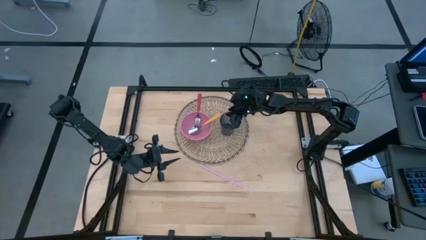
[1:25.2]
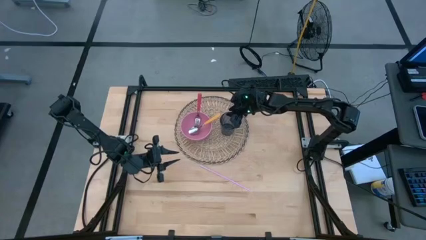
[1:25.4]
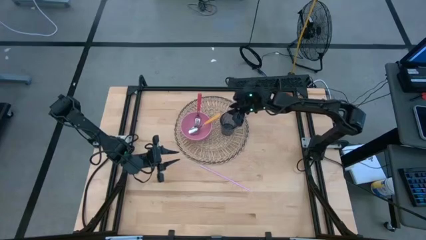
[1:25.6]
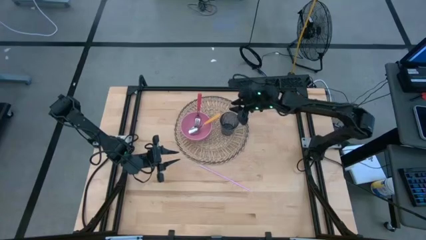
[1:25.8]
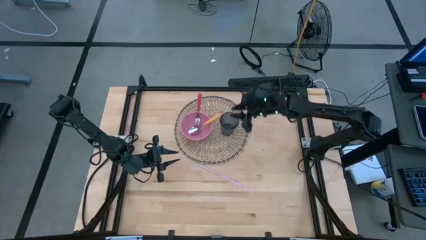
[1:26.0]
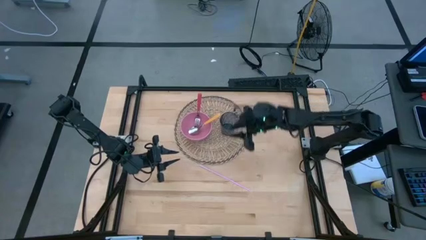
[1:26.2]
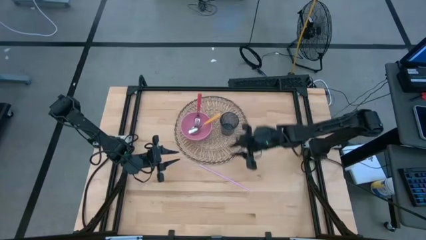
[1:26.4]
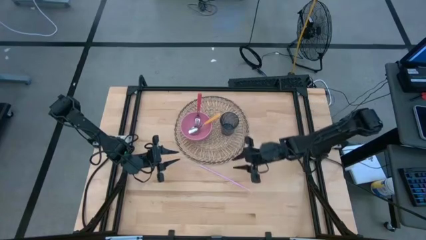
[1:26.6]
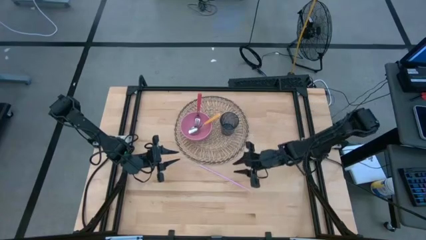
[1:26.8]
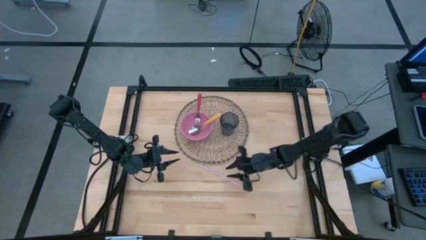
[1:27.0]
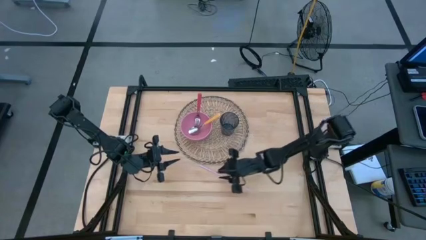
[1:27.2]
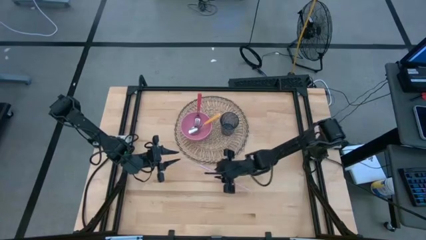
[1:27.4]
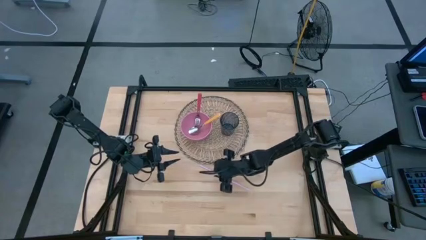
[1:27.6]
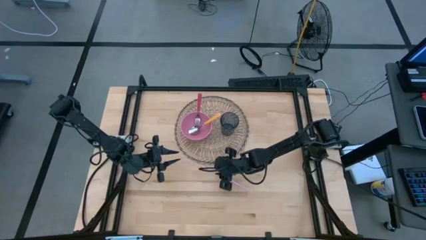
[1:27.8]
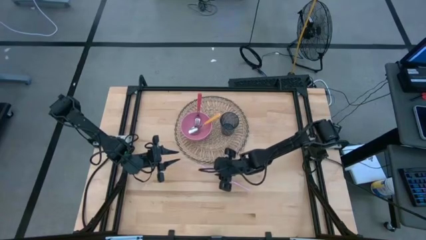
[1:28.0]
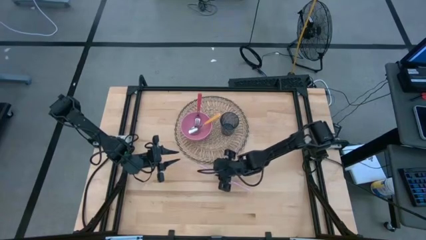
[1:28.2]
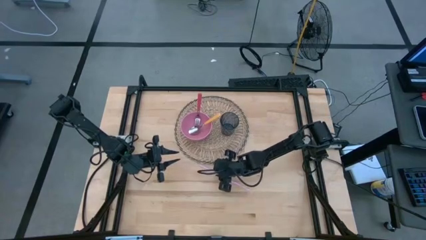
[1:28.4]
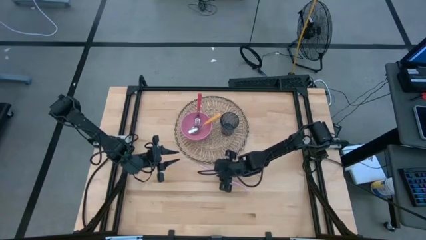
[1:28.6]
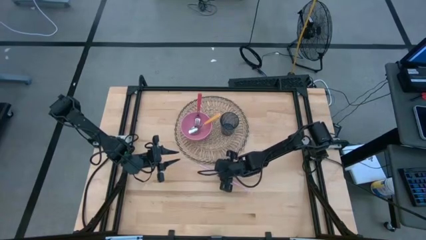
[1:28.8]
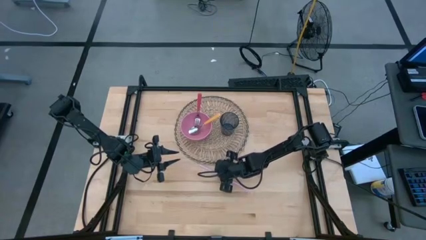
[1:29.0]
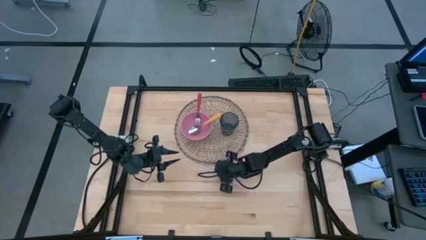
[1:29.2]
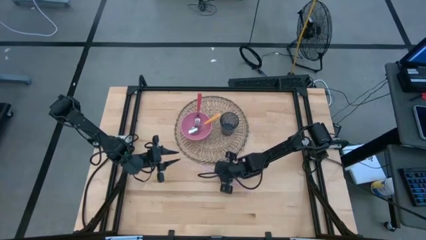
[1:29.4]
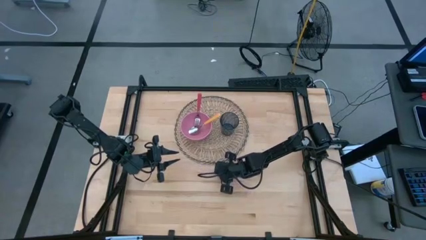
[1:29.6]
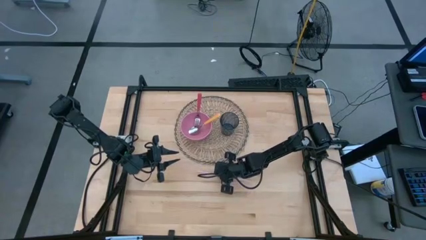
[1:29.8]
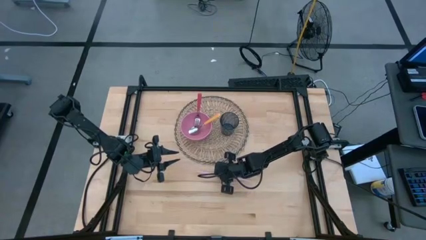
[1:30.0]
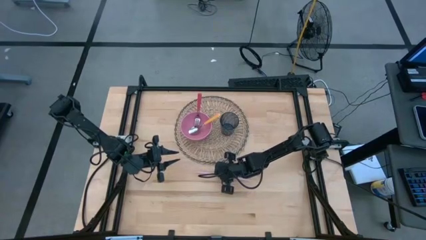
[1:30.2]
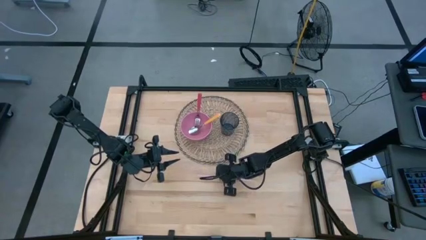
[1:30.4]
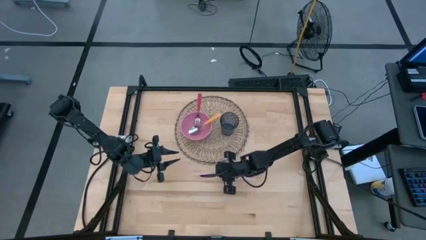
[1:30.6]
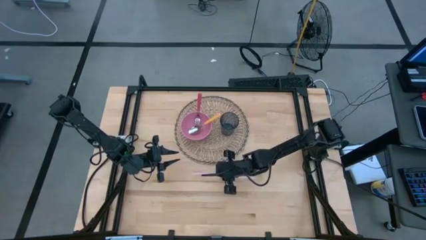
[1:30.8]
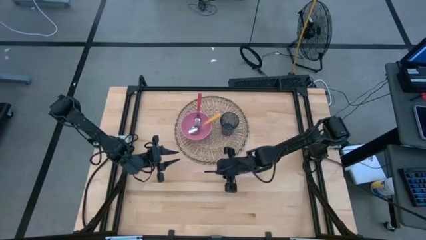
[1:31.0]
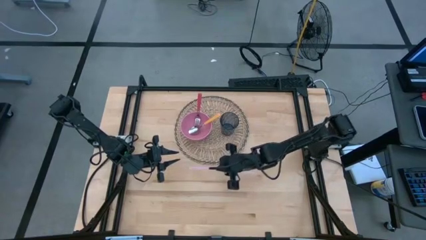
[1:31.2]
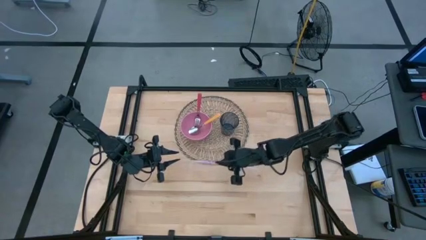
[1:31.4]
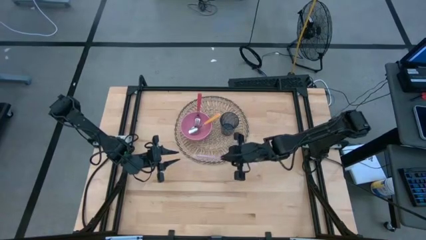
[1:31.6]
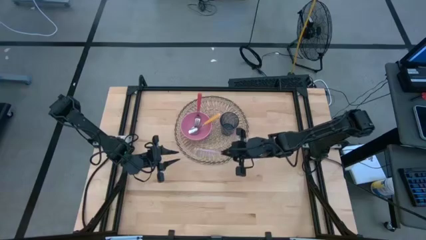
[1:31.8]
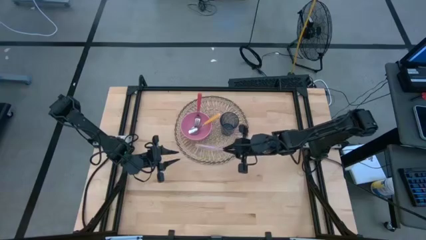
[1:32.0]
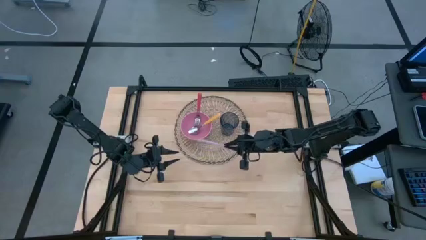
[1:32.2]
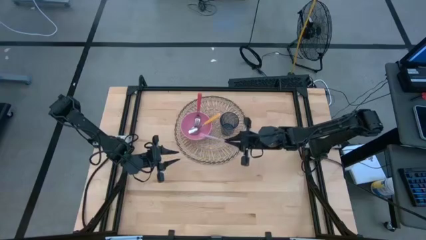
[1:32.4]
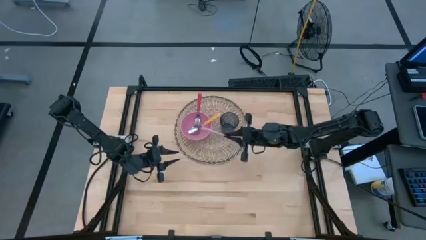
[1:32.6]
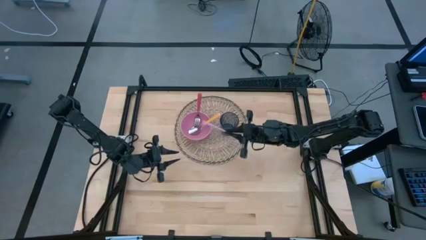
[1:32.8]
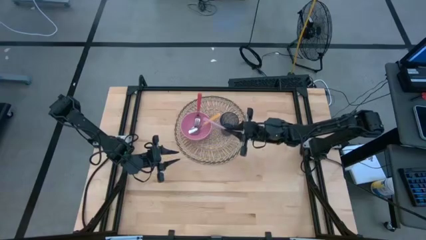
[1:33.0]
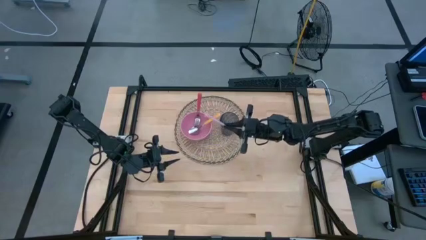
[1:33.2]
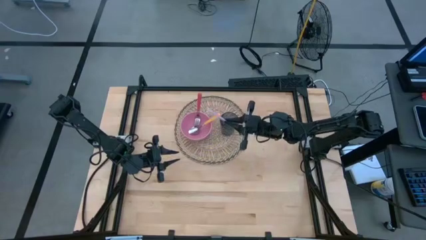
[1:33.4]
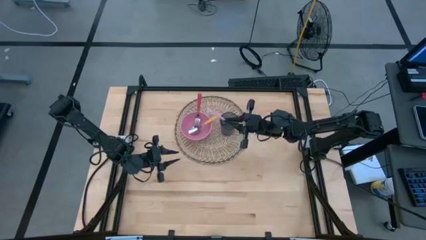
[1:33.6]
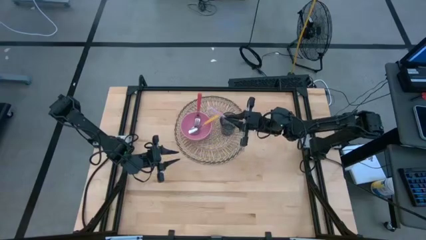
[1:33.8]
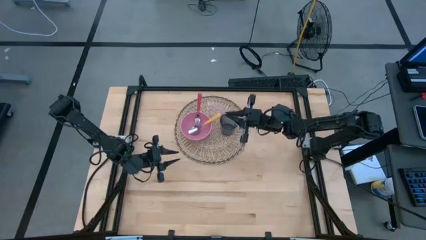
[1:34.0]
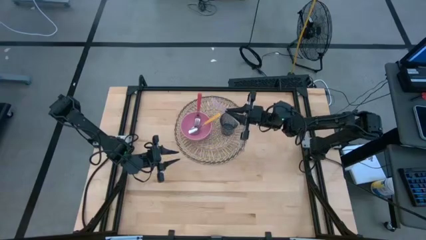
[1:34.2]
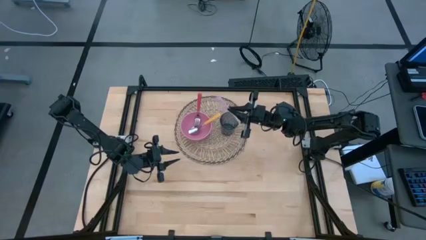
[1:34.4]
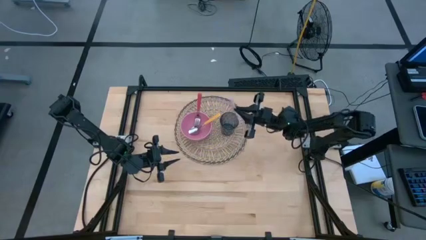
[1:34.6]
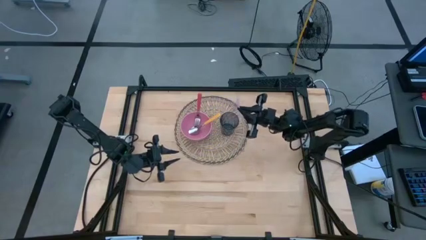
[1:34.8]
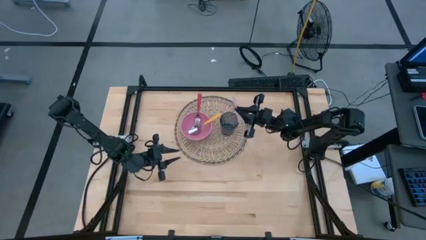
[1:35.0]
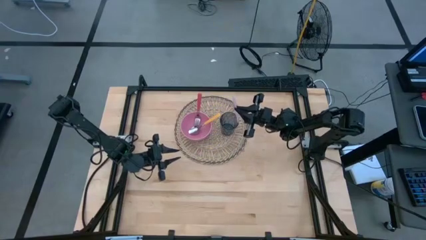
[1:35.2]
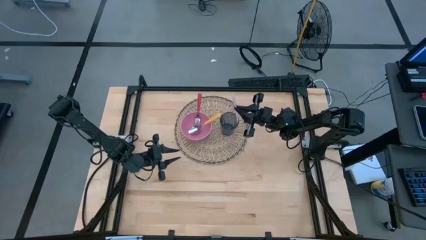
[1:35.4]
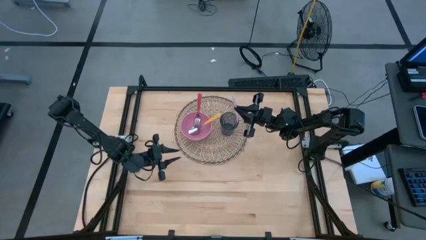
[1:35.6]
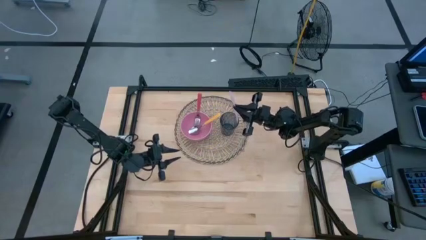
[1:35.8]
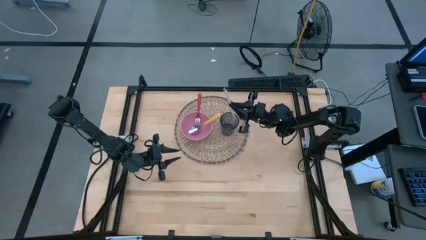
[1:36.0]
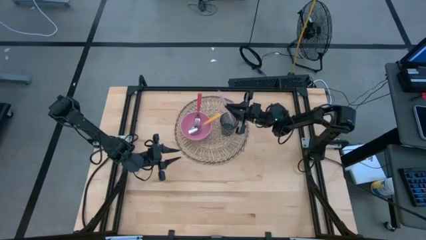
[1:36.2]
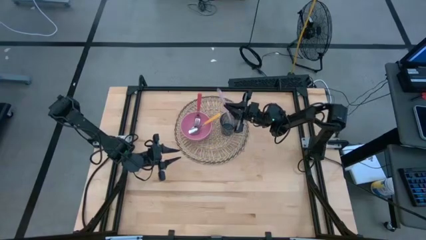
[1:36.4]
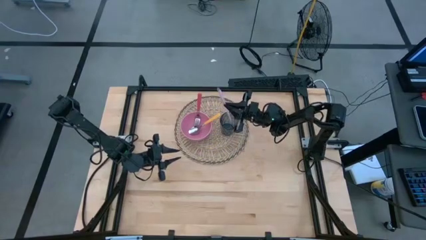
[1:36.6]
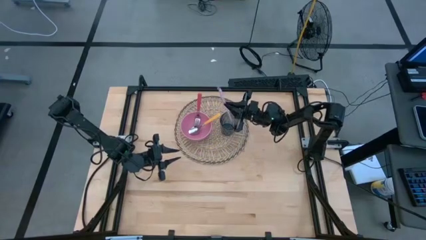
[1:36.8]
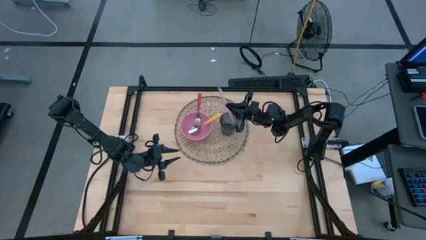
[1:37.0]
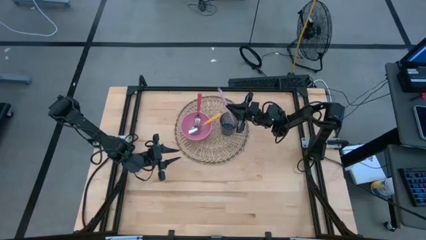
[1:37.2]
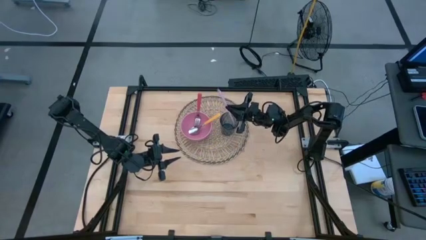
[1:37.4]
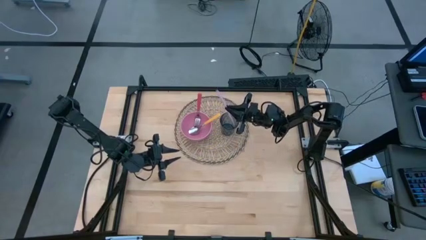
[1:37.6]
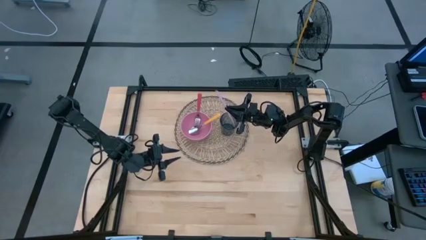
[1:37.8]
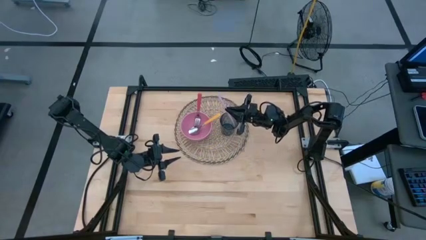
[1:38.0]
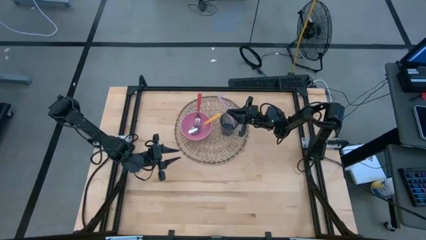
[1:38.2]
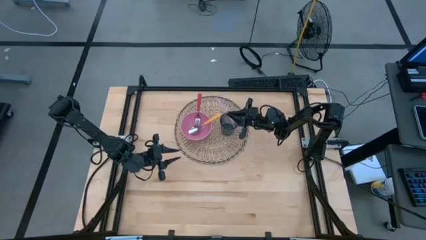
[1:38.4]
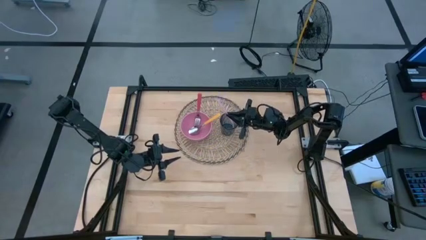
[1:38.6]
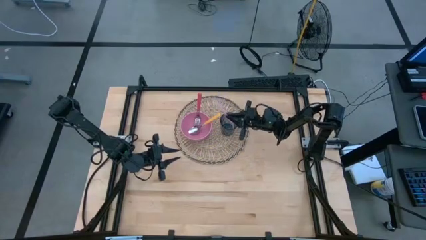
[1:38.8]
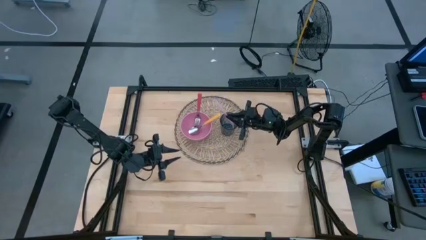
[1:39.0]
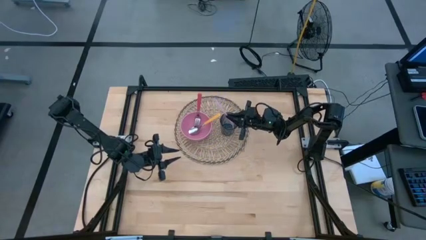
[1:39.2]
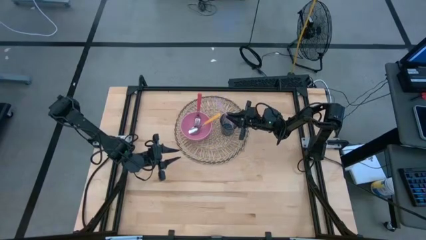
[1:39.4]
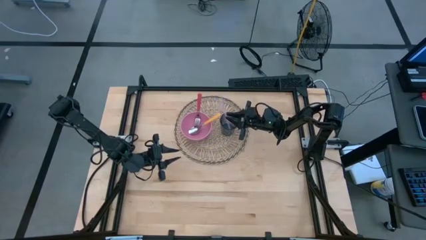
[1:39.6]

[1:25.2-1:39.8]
Task: Pick & Place Utensil
Put the pink straw into the blue cup on the brown placemat
